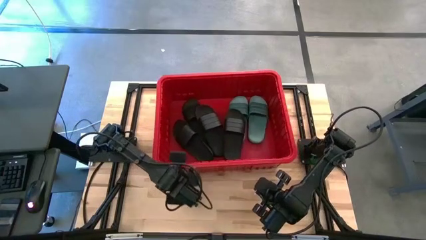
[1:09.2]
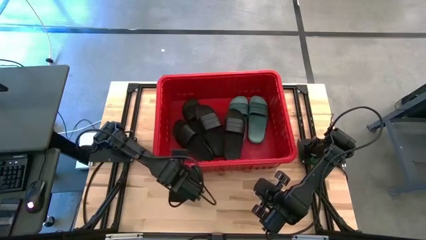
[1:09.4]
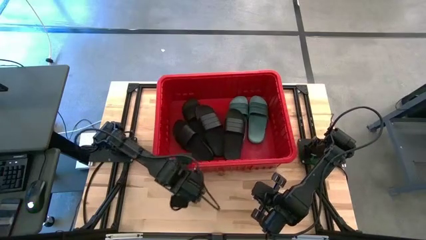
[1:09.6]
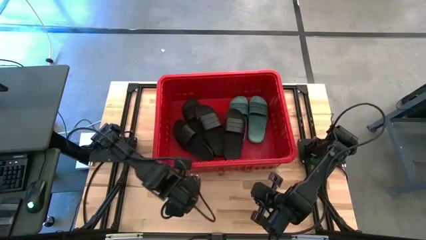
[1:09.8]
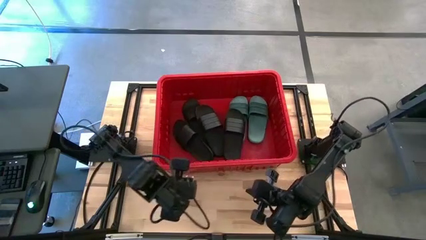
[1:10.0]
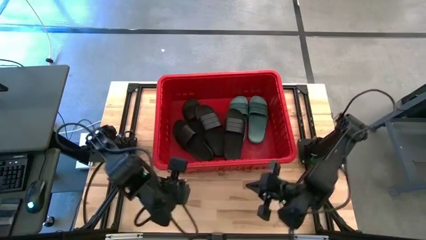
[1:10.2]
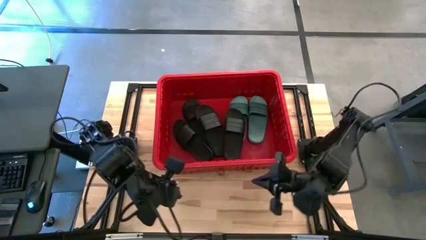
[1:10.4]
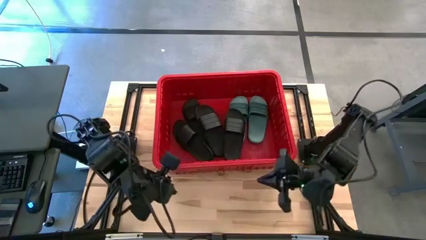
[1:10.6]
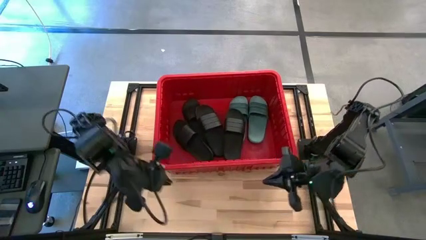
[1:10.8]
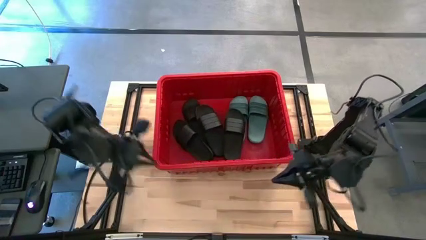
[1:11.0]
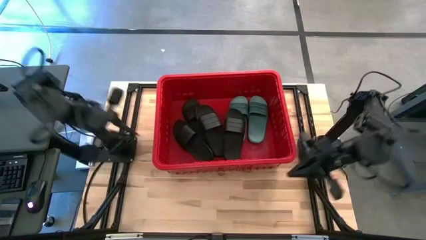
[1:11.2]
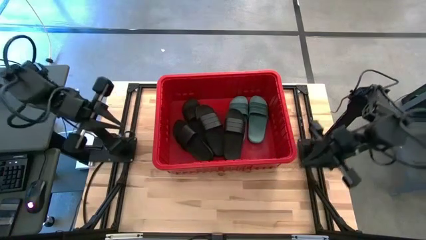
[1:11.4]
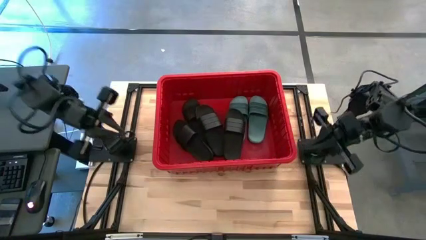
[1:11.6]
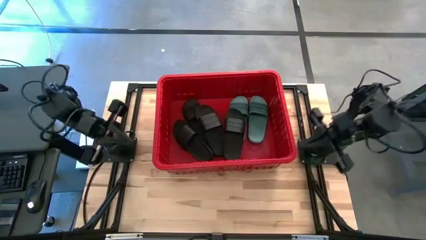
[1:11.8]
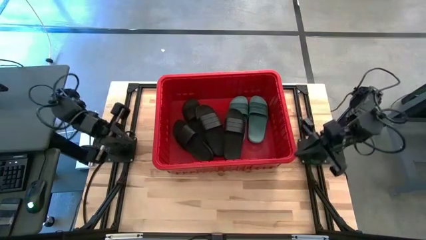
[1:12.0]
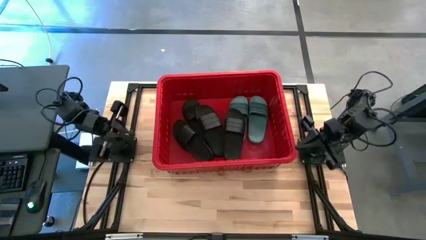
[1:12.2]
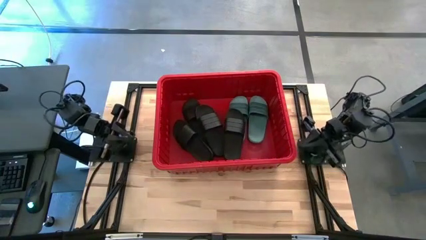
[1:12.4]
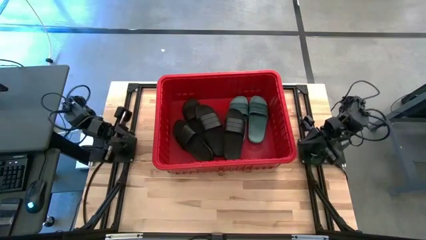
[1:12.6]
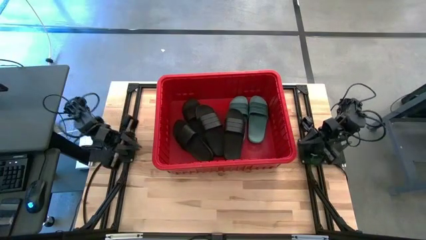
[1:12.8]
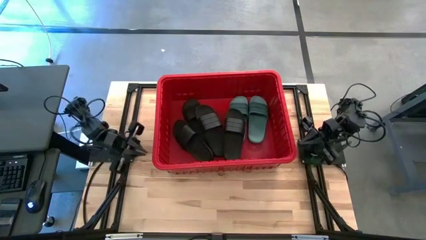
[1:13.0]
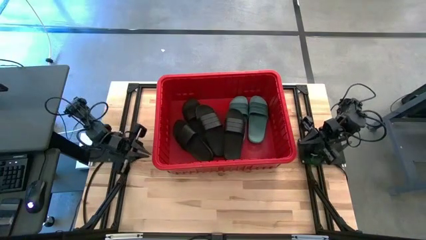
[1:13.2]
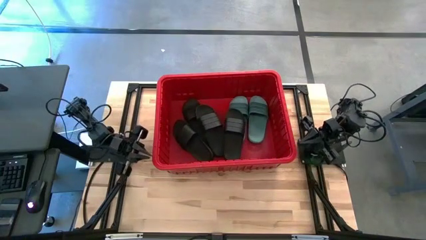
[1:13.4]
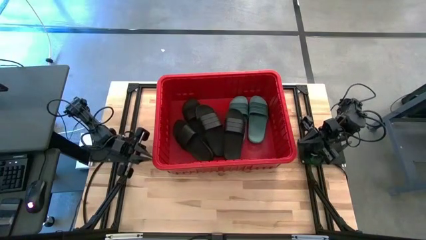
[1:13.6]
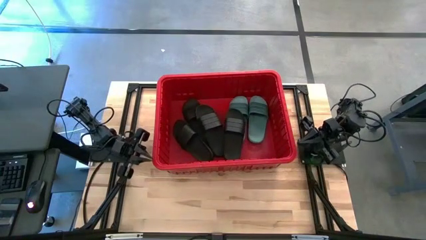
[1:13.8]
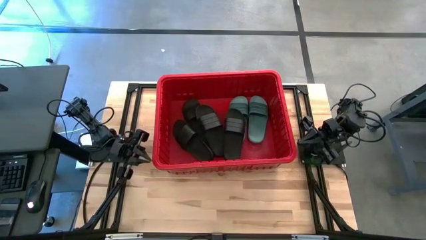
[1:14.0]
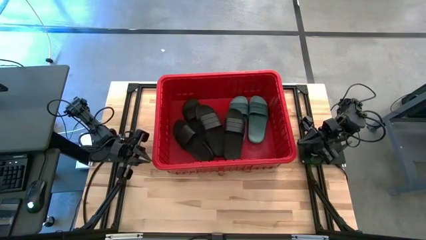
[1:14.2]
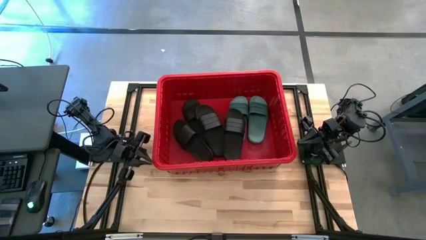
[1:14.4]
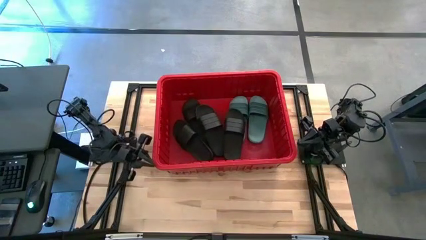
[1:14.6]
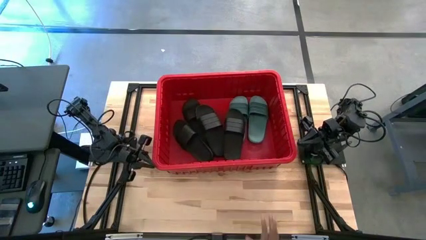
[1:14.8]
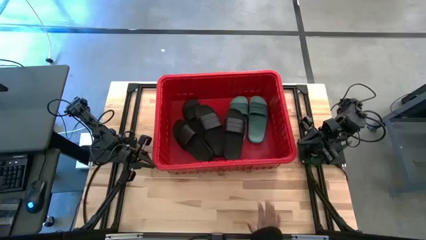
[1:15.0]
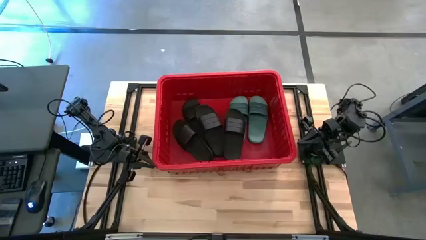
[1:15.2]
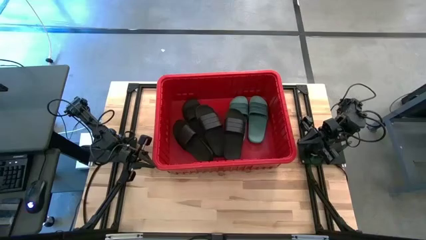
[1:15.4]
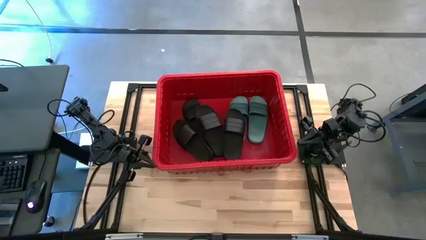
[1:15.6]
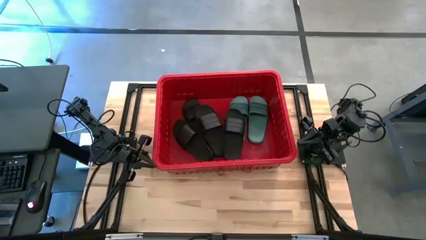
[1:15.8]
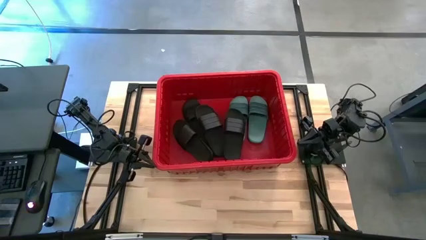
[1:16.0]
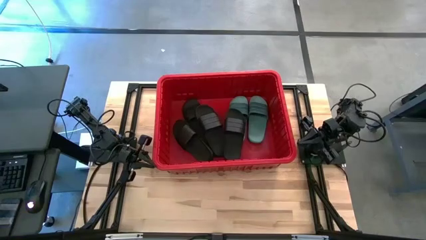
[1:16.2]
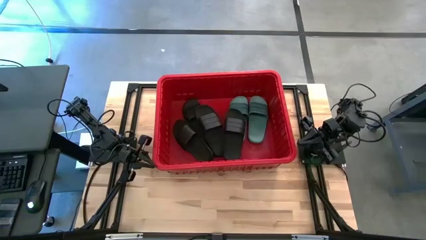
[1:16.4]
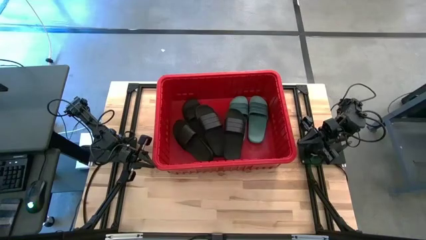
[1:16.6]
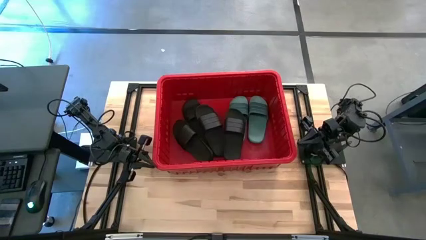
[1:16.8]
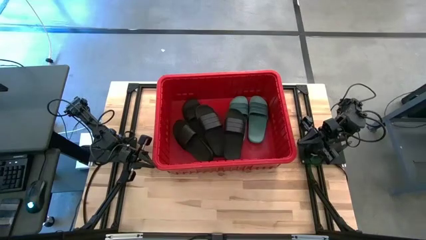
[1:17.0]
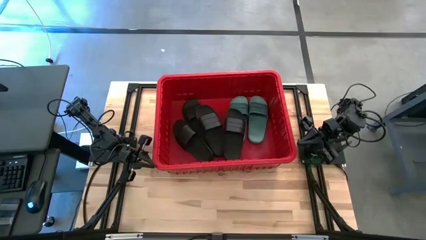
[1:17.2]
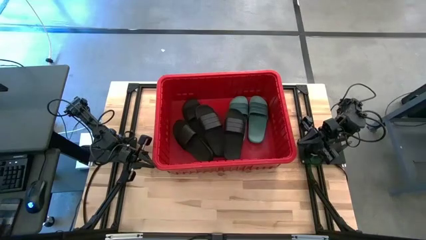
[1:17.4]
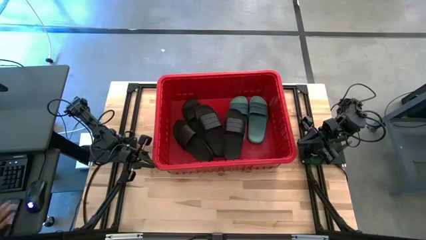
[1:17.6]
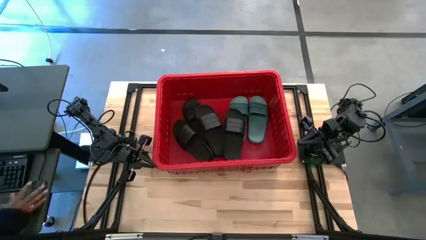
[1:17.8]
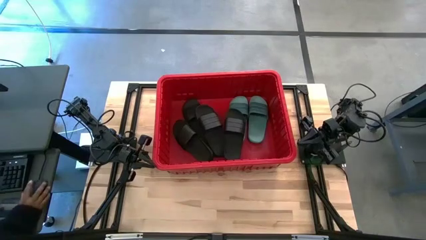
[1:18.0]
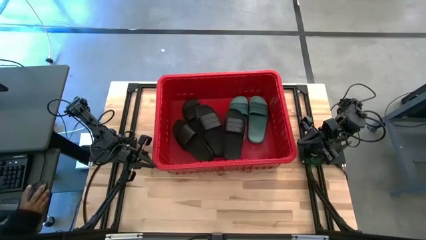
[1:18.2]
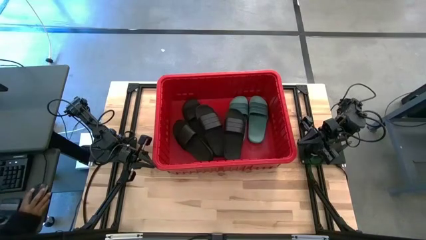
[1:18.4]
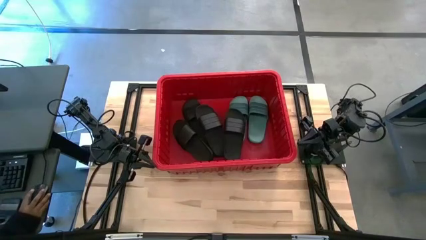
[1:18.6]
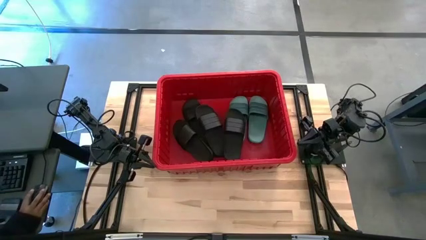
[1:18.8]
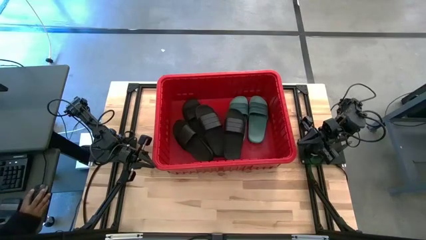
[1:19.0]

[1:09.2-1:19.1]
Task: Pick and place slides into bin
Return to Home Position

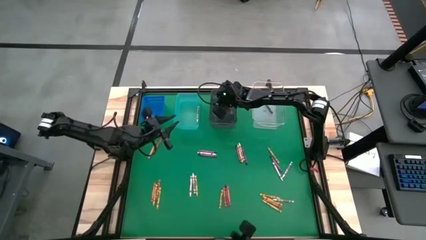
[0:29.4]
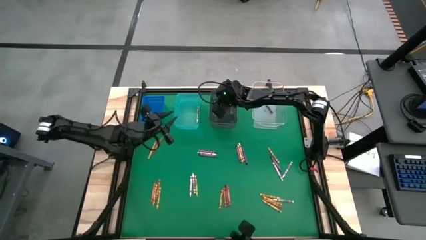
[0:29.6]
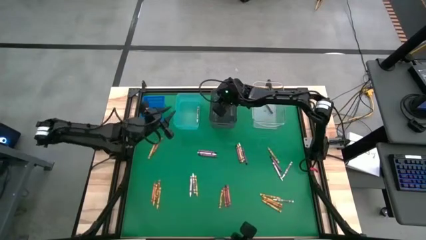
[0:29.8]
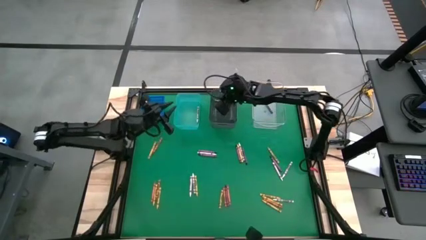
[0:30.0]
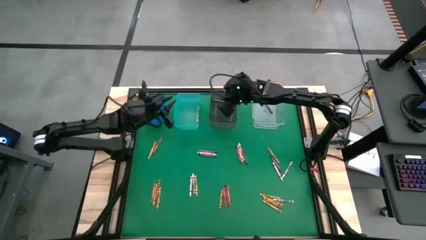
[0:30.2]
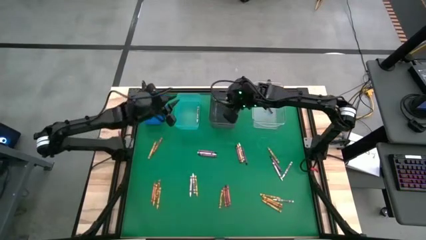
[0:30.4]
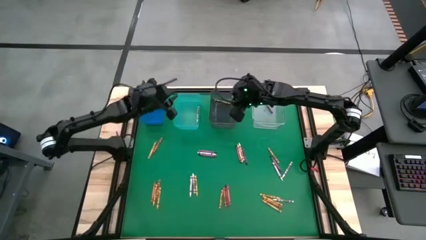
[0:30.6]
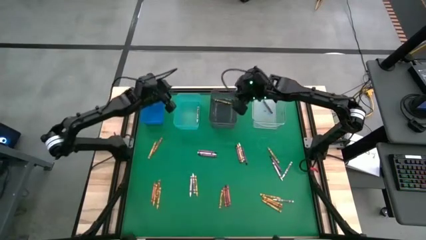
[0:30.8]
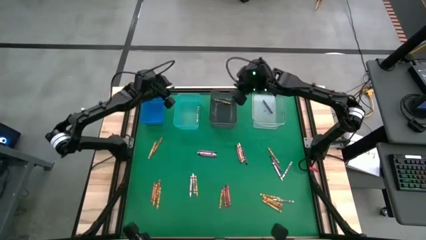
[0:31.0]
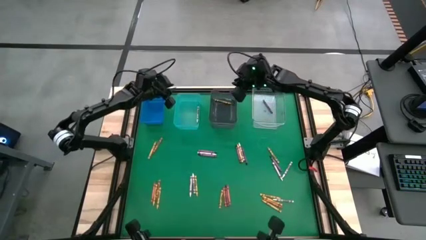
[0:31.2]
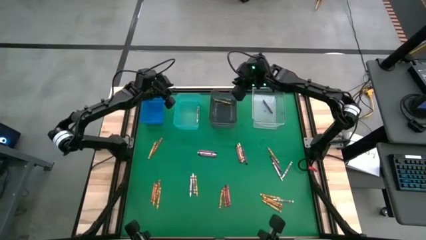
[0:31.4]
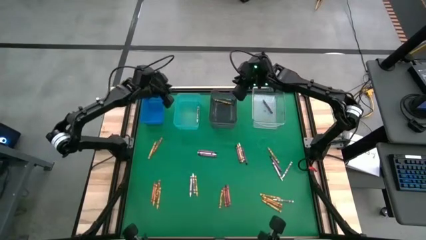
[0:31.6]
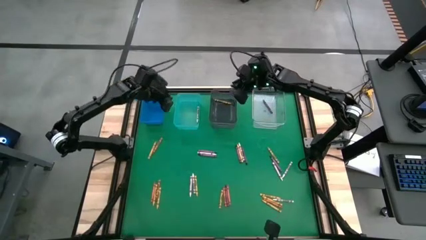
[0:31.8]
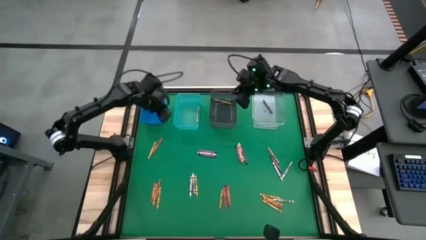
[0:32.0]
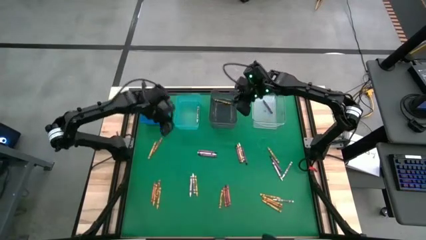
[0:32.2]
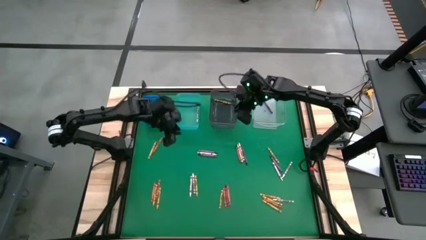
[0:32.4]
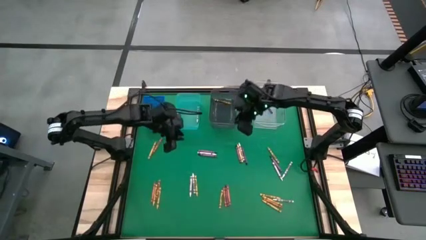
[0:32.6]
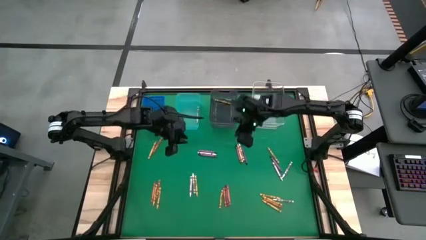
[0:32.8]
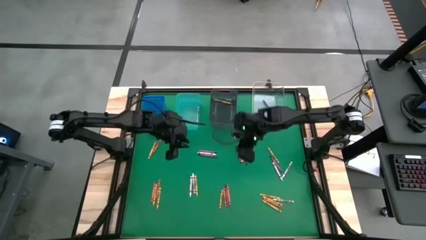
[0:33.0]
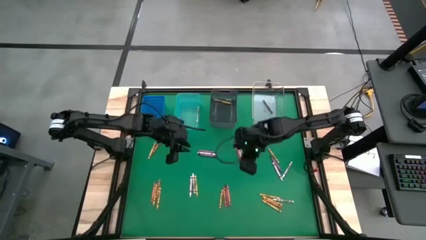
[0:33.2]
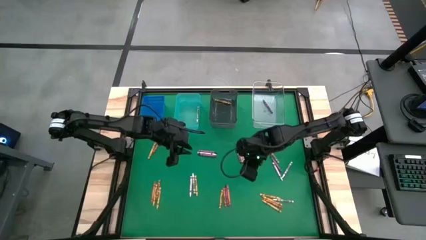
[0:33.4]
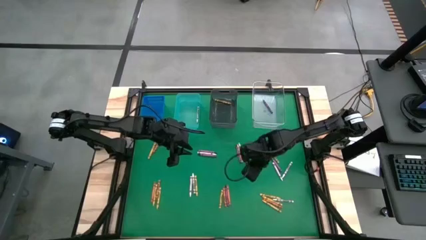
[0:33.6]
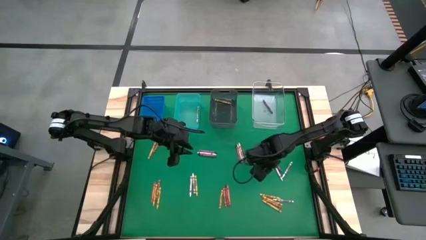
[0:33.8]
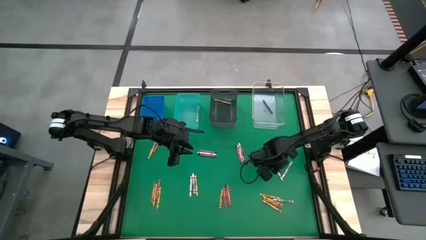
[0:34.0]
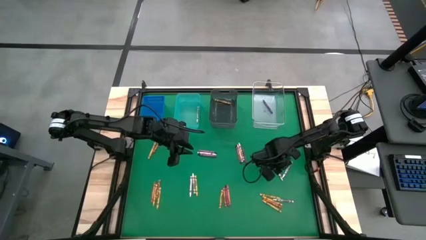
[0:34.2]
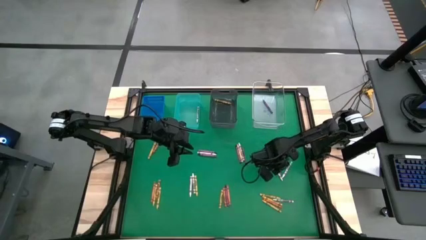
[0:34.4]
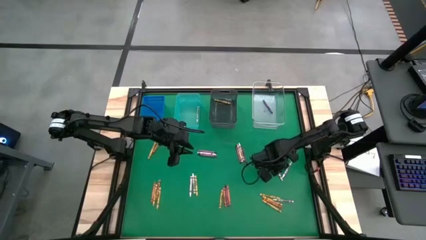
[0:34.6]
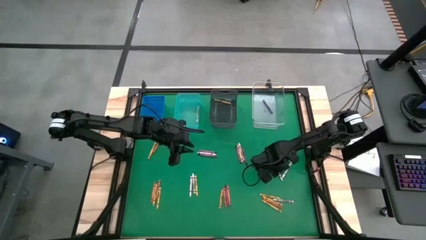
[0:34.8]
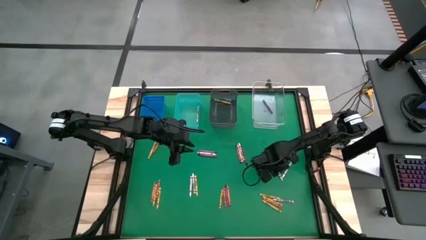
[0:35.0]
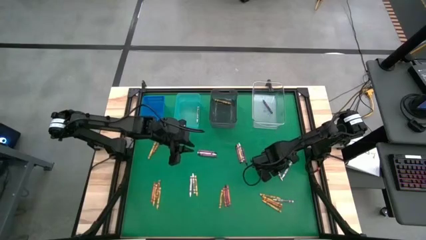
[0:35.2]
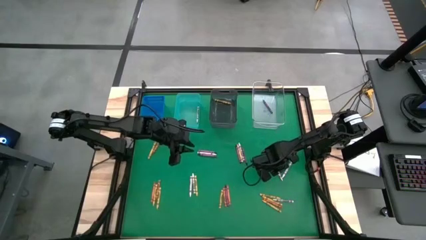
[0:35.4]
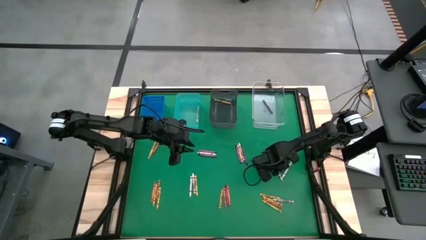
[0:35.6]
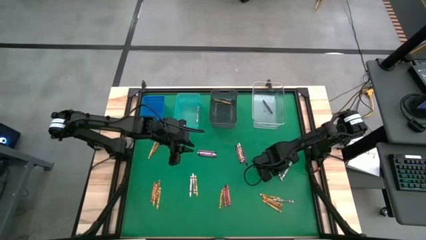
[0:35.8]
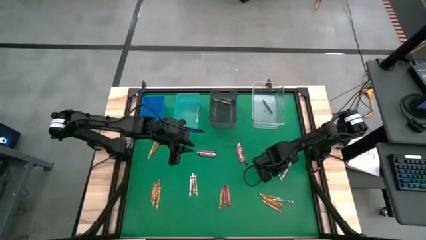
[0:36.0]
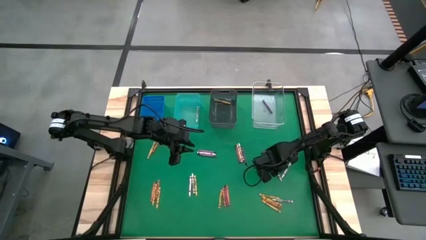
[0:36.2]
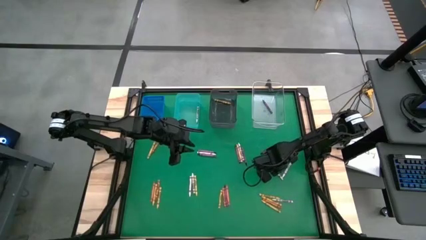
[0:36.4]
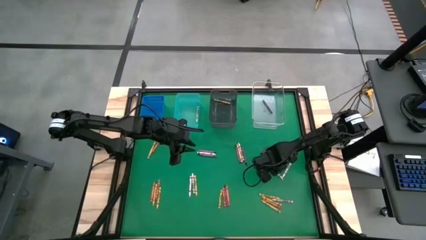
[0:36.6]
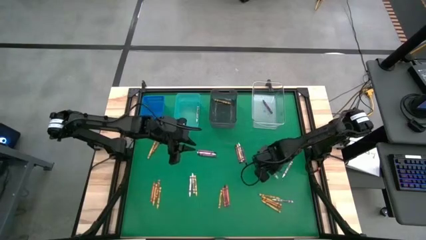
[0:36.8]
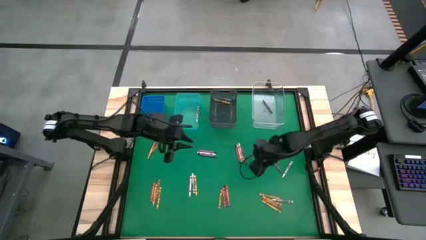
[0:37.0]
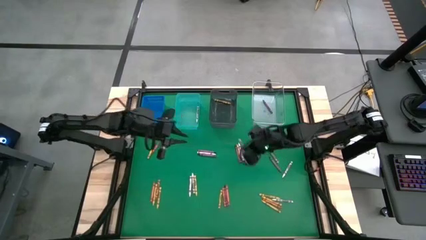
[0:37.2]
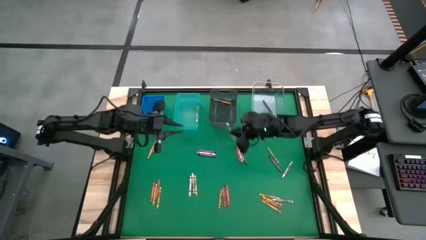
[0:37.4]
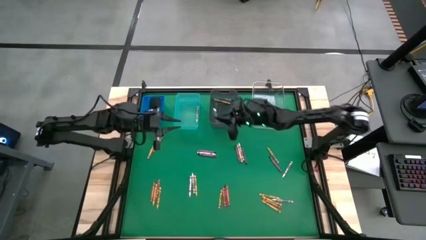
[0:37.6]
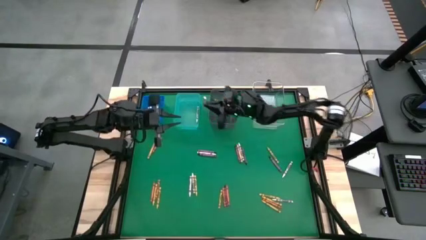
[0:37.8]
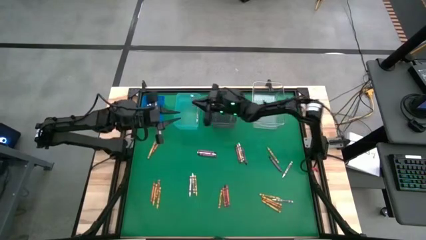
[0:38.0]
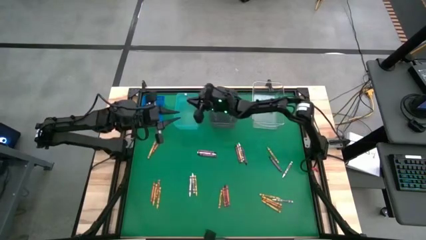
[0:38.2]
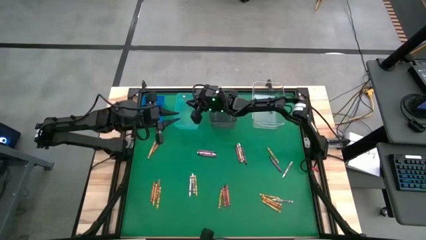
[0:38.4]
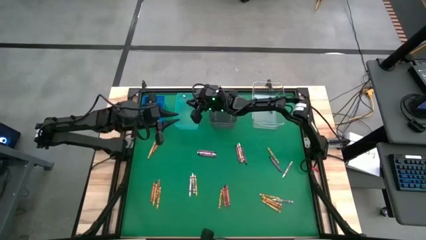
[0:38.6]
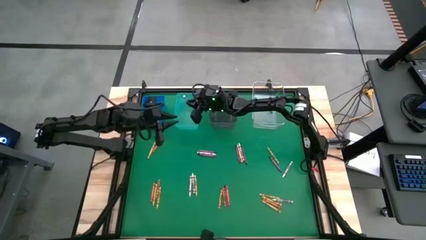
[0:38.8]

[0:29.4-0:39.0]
Task: Sort crayons
Put the white crayon into the light blue bin
